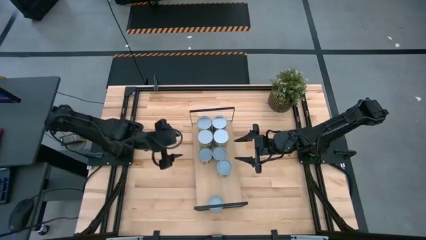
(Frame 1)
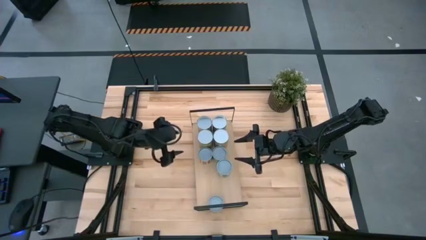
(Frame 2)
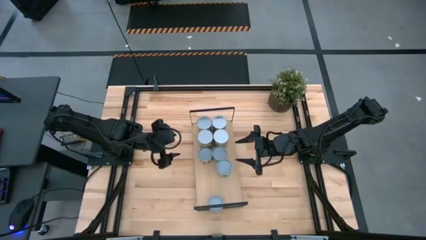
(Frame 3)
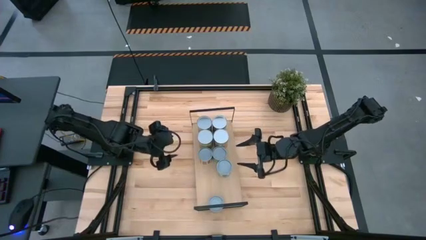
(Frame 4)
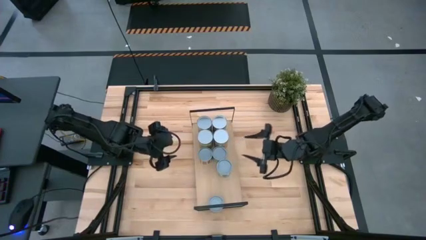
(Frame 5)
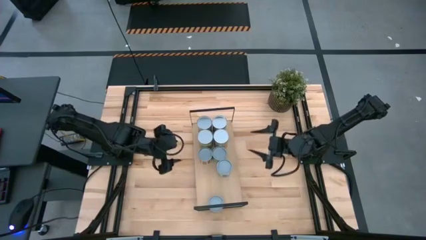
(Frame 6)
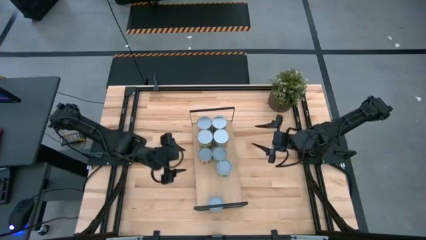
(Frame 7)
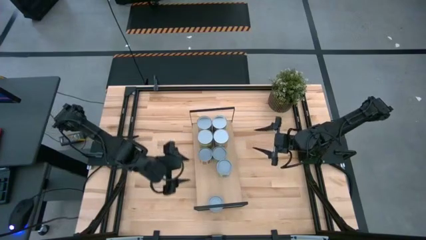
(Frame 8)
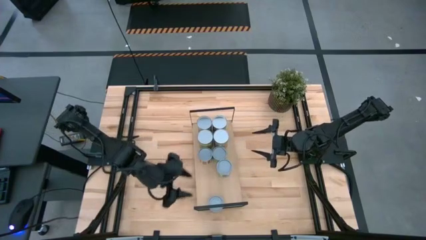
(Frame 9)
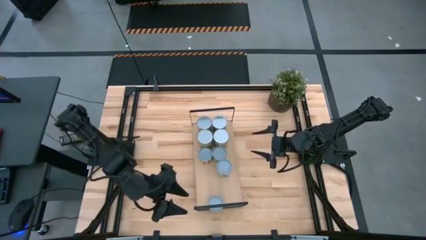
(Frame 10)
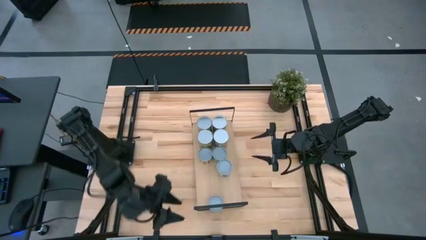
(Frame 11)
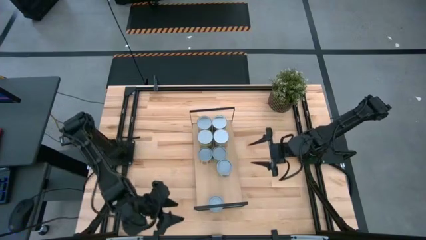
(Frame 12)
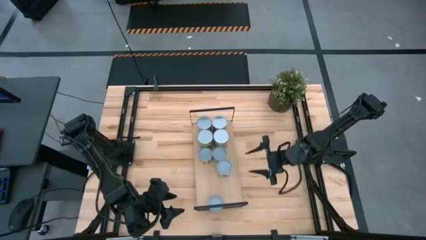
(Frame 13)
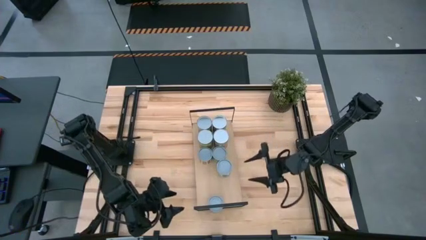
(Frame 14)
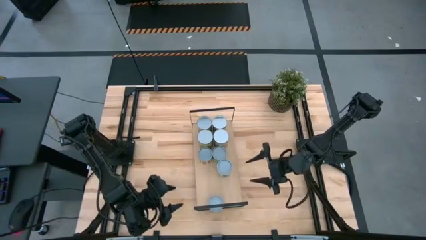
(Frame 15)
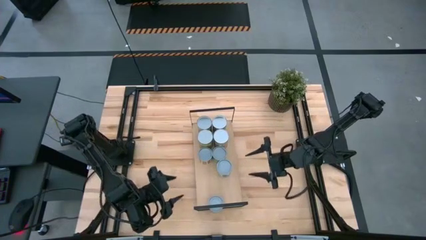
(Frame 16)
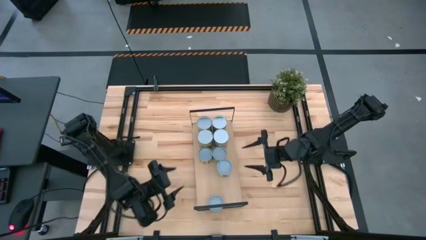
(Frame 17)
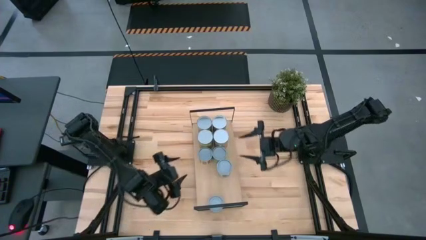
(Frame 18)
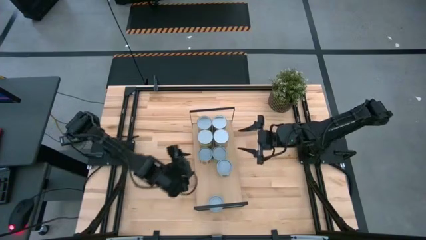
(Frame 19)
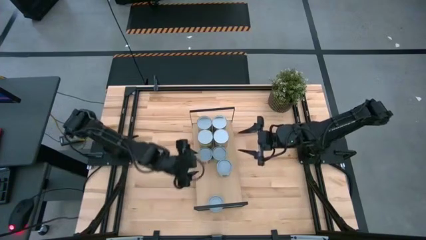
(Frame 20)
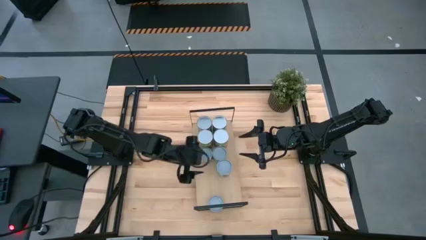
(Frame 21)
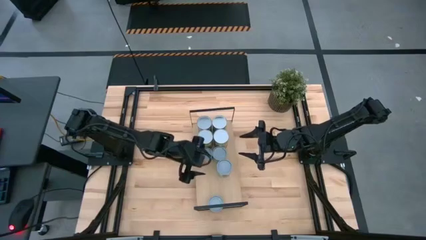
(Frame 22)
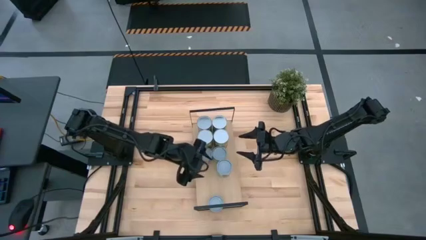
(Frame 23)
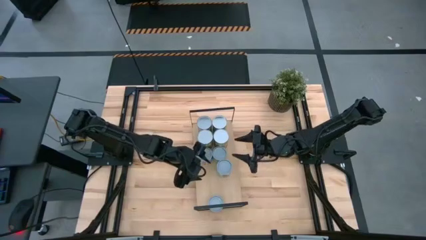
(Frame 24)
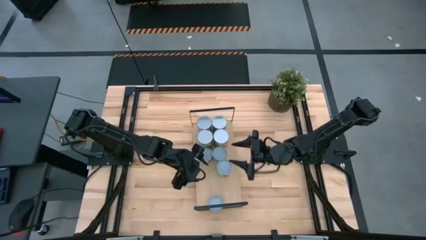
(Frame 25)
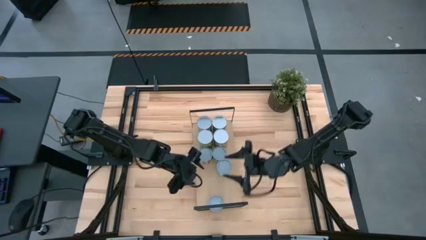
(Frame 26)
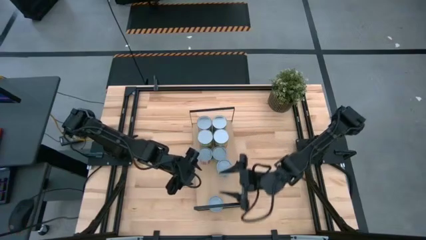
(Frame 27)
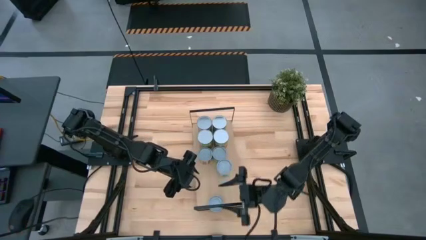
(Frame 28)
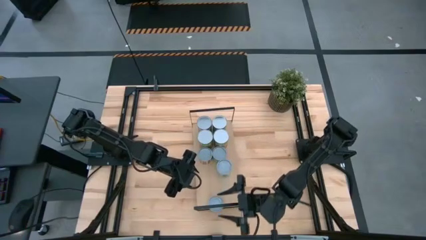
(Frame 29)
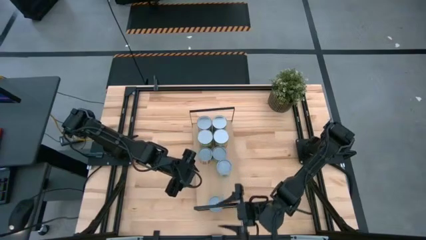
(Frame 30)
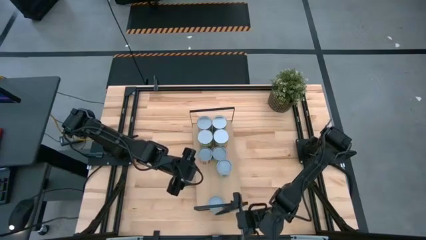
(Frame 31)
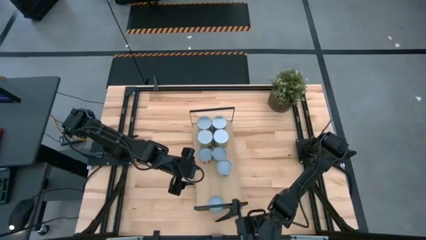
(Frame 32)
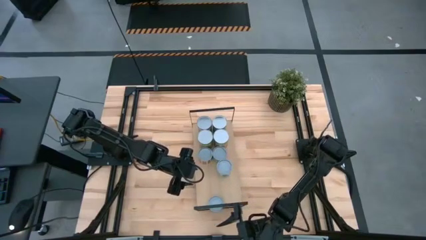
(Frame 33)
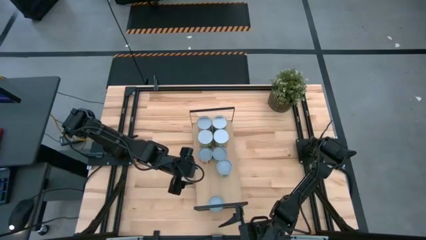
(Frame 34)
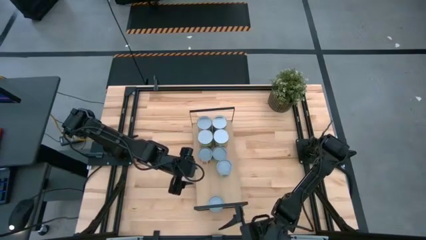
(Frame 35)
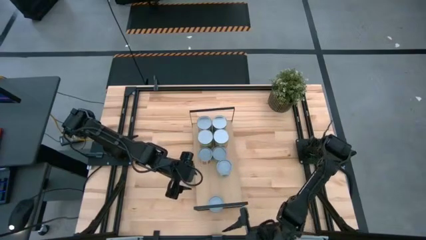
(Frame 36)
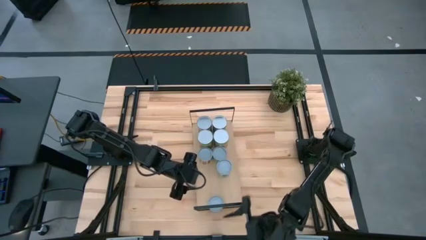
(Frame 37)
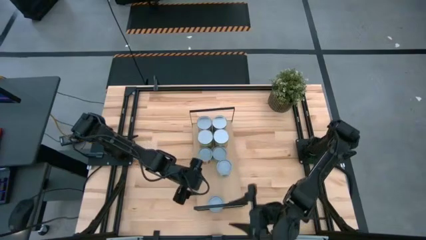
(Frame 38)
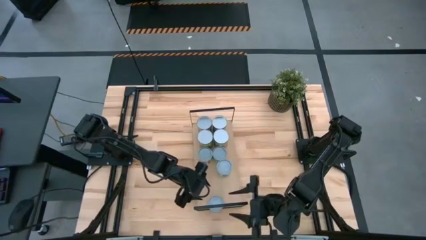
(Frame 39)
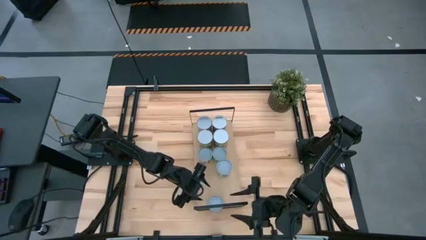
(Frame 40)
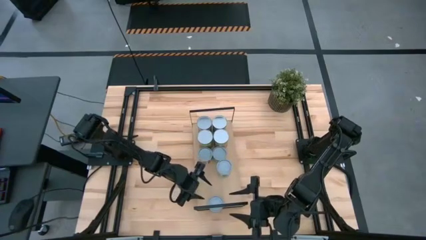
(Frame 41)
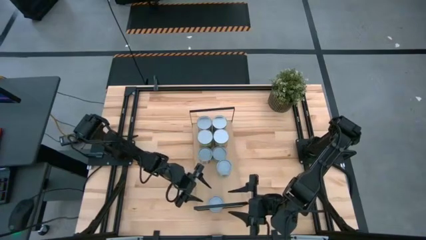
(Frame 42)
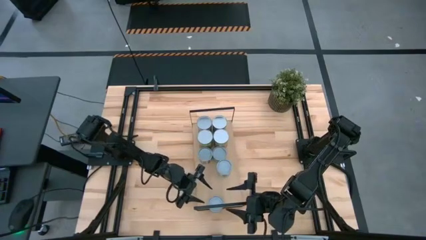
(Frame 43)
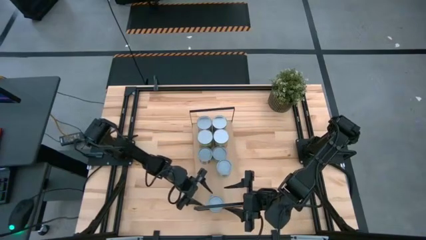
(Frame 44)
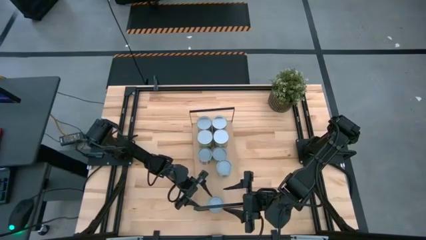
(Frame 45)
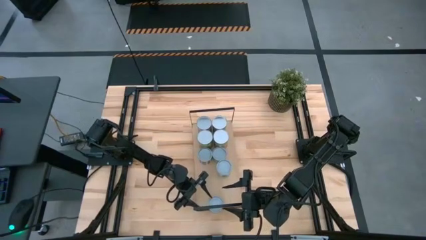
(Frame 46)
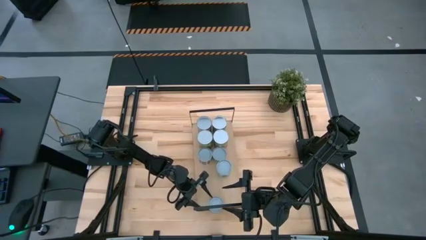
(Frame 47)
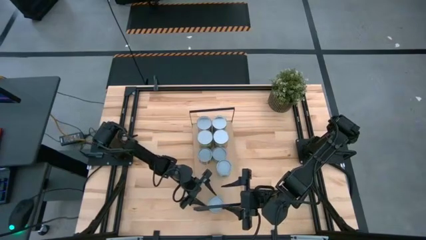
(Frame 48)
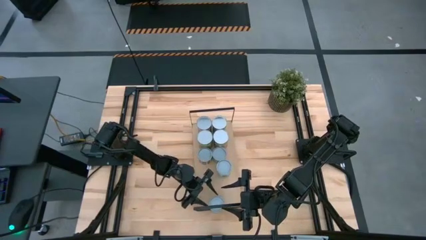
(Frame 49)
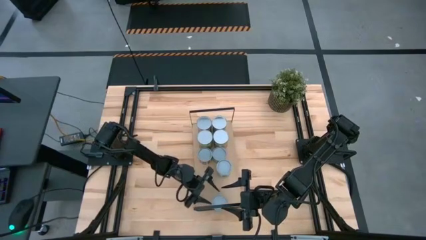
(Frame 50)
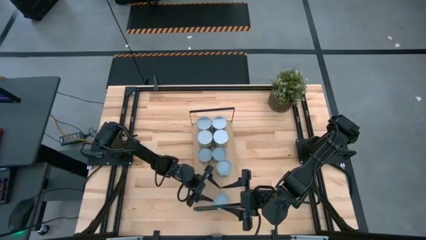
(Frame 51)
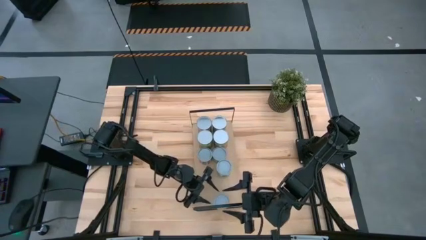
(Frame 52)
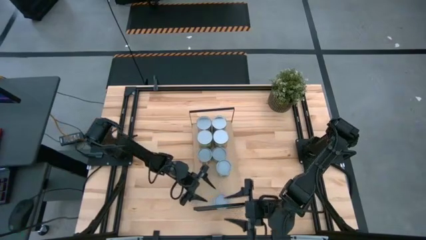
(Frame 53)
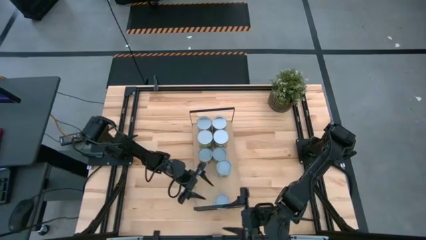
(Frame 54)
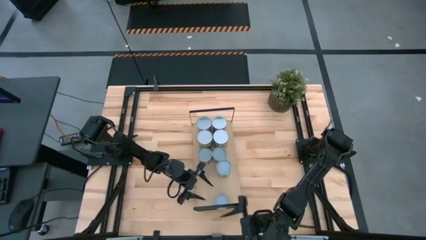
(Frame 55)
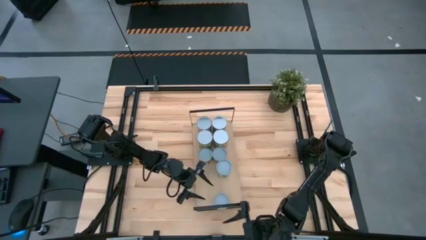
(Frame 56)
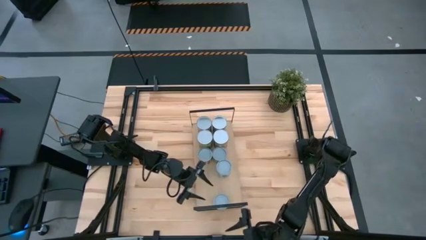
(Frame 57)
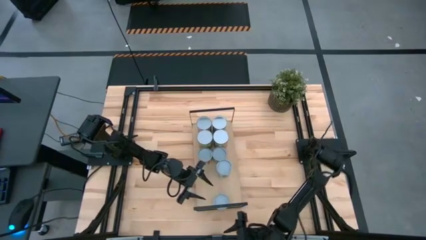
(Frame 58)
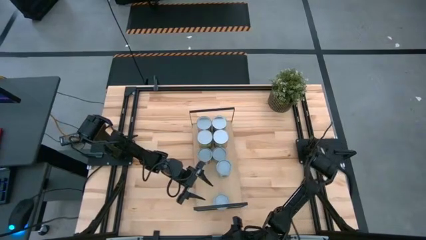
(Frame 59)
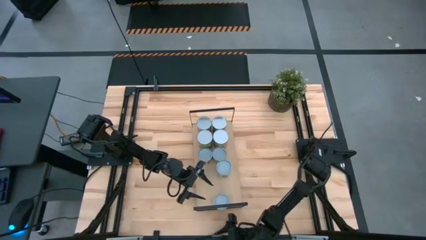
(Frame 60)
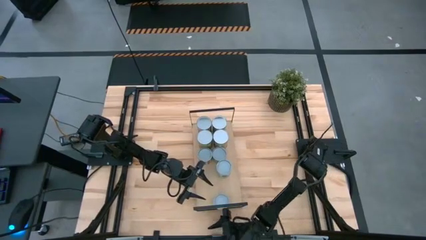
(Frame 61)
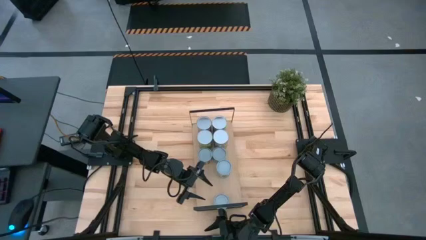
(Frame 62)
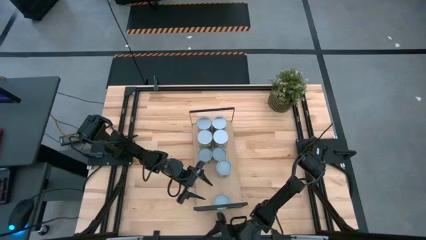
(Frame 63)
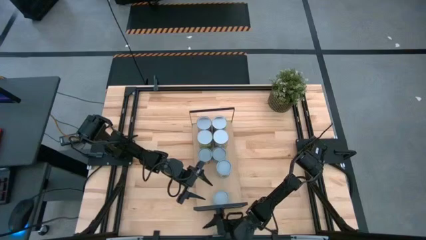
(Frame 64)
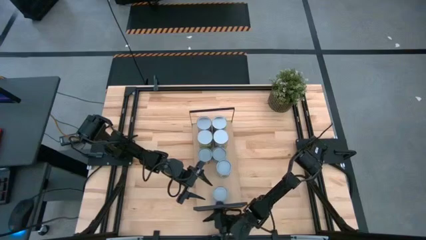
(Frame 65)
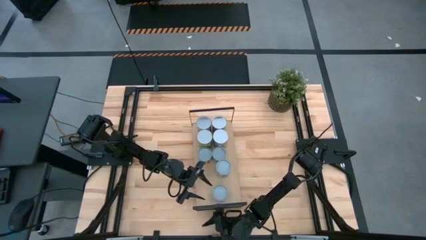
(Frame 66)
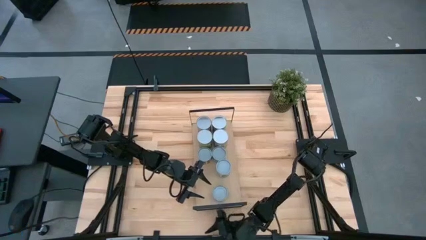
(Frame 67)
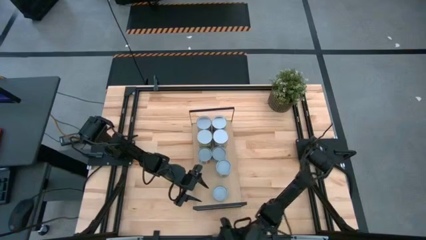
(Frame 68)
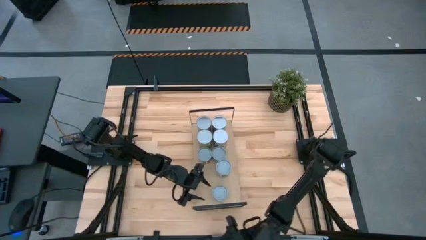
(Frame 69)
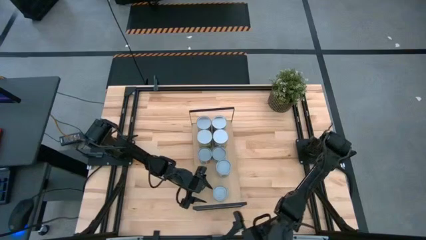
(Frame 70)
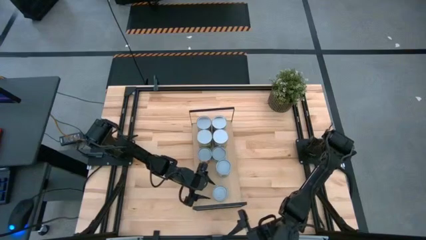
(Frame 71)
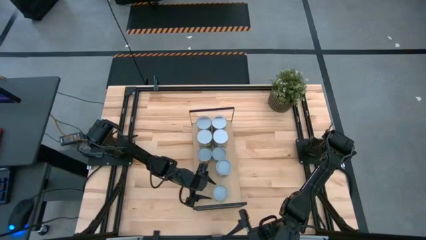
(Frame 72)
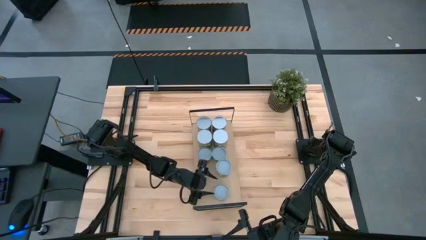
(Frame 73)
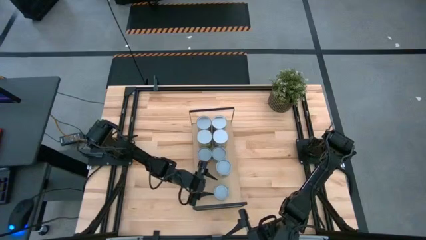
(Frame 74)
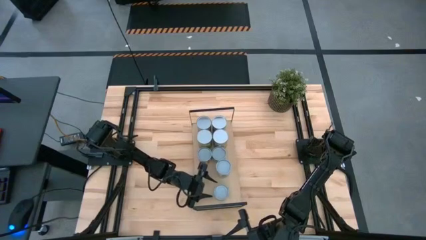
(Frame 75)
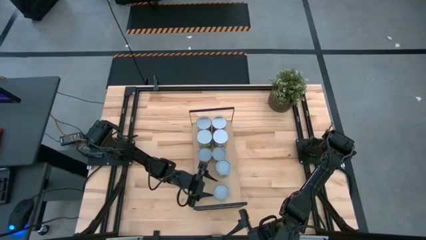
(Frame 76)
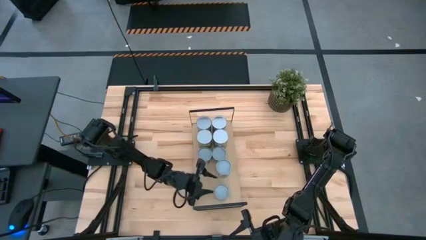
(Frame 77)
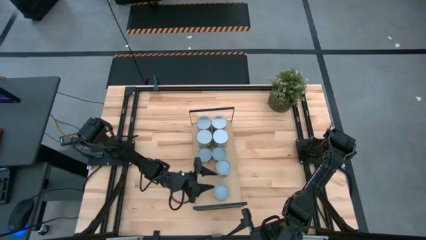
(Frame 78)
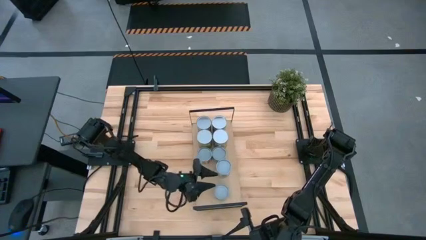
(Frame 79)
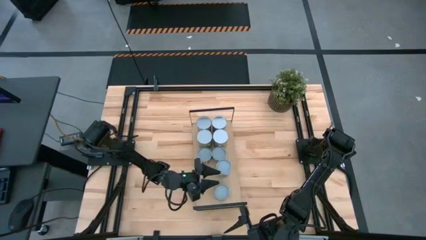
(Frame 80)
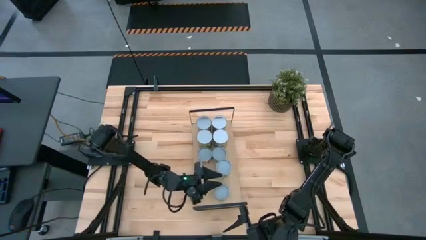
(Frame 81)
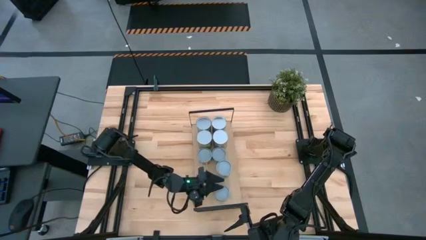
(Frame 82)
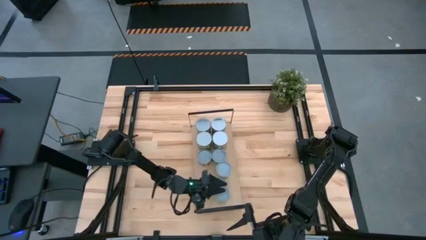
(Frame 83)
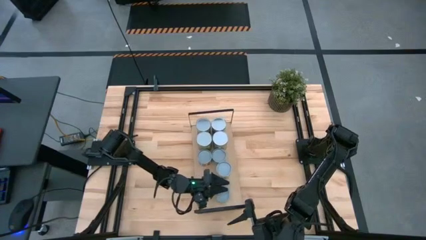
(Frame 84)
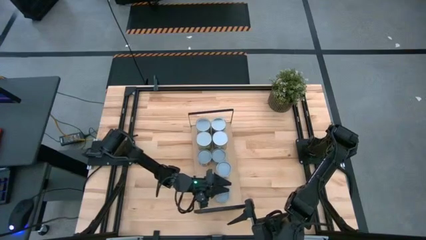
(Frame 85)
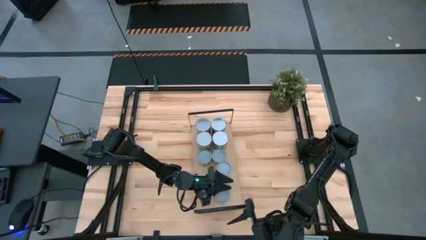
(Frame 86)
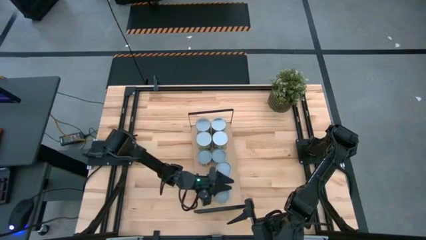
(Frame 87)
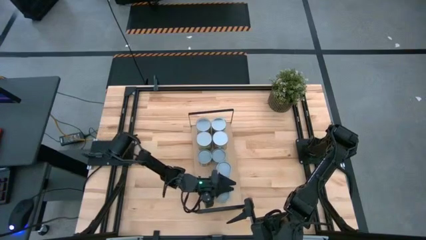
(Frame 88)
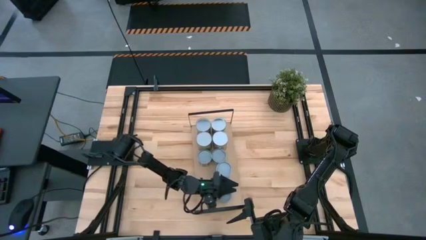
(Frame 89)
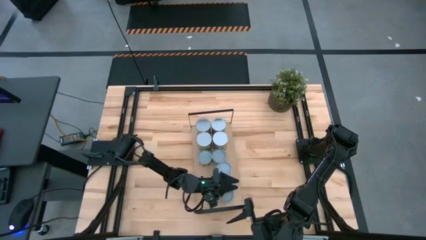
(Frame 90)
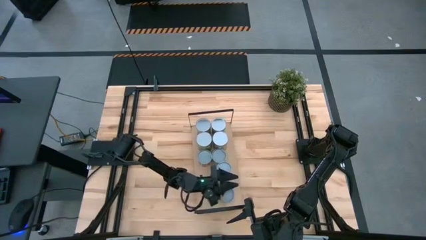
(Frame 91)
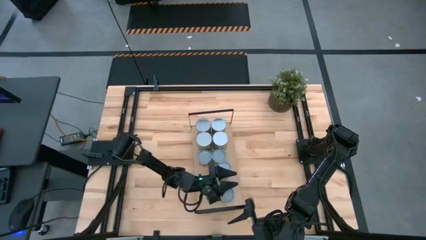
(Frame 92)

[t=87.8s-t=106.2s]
Task: Pick and place cans onto a shelf
Put the canned tuna on the shelf
